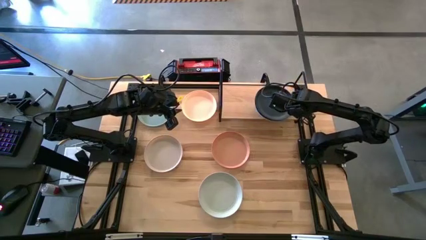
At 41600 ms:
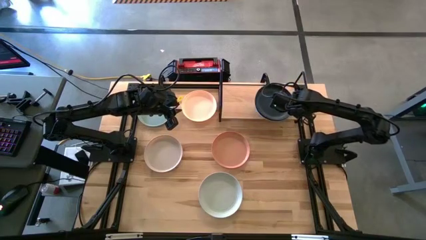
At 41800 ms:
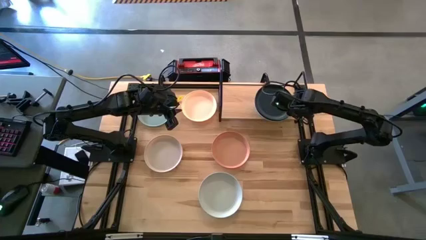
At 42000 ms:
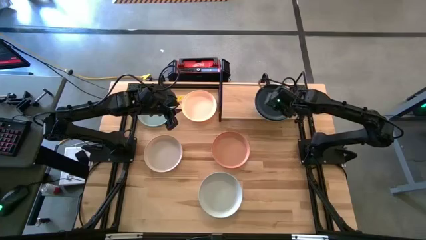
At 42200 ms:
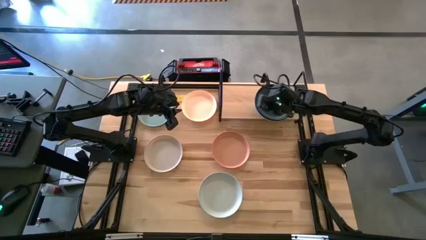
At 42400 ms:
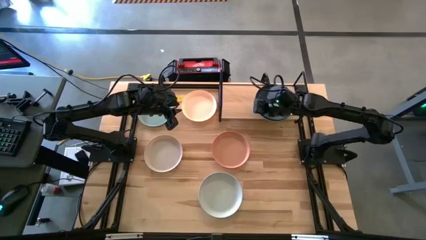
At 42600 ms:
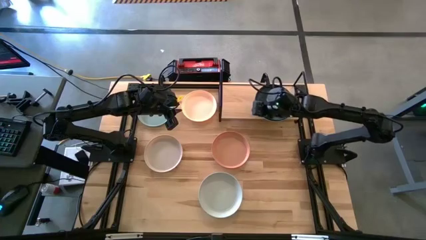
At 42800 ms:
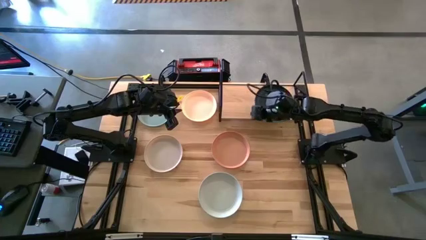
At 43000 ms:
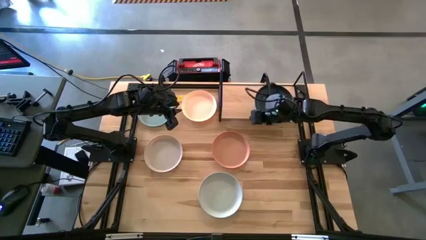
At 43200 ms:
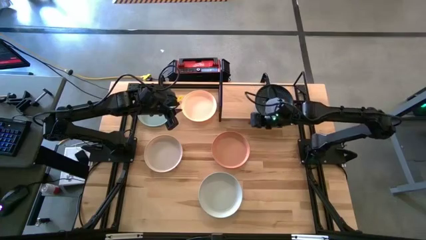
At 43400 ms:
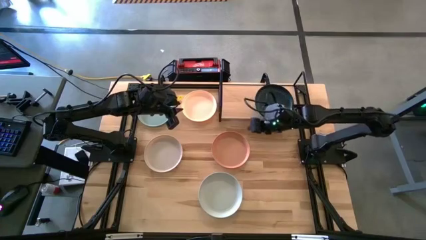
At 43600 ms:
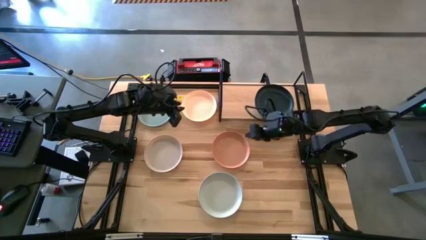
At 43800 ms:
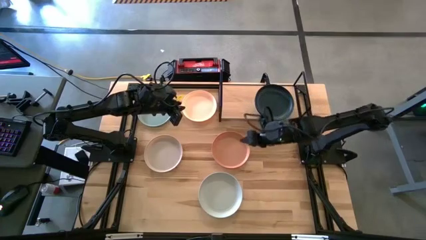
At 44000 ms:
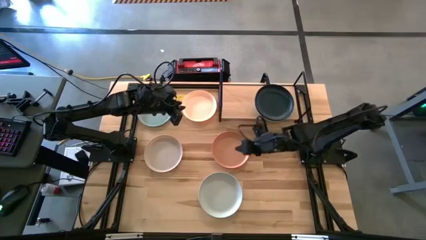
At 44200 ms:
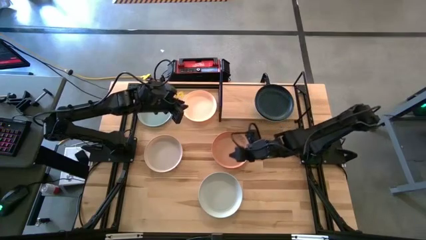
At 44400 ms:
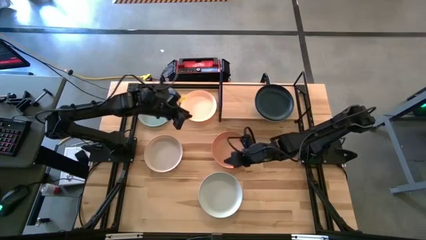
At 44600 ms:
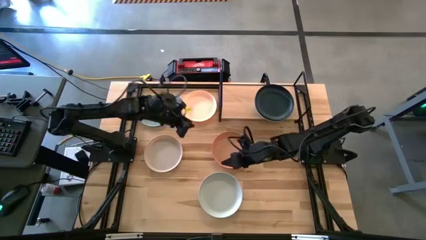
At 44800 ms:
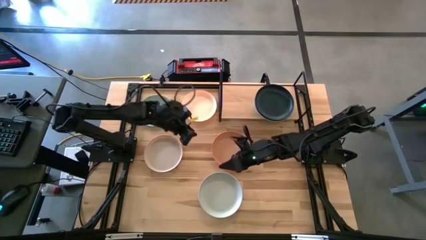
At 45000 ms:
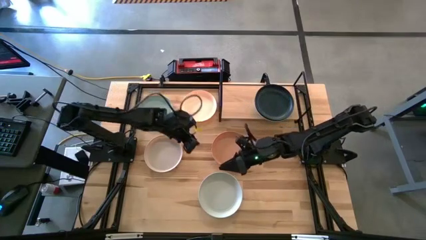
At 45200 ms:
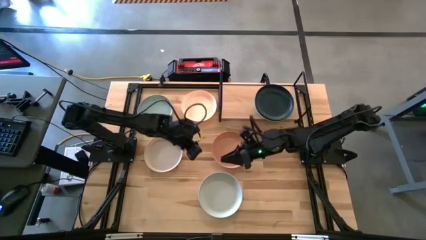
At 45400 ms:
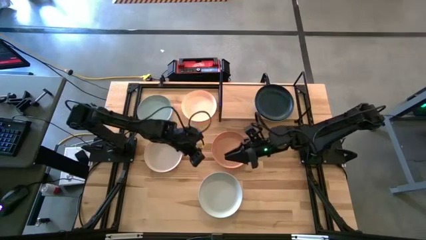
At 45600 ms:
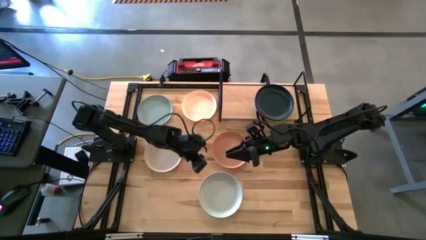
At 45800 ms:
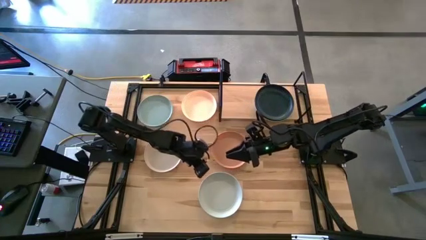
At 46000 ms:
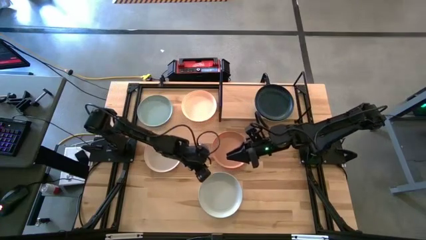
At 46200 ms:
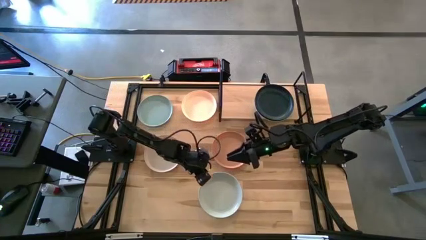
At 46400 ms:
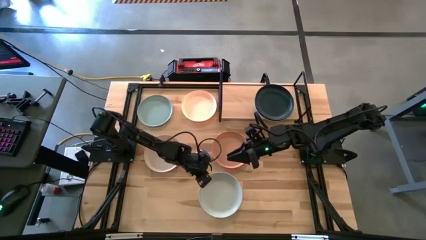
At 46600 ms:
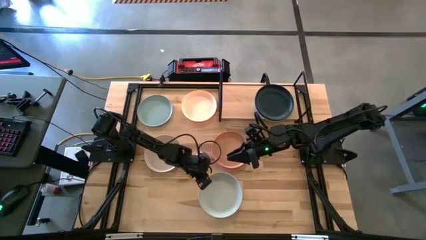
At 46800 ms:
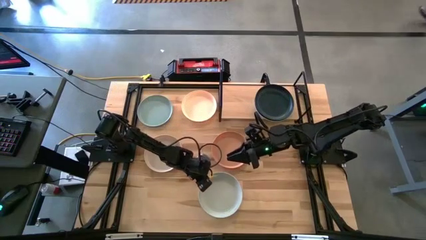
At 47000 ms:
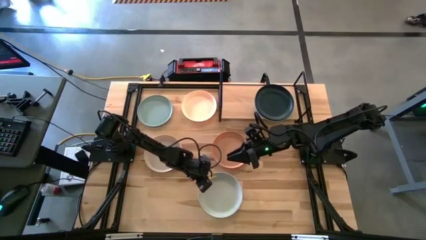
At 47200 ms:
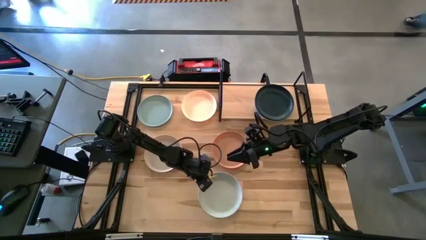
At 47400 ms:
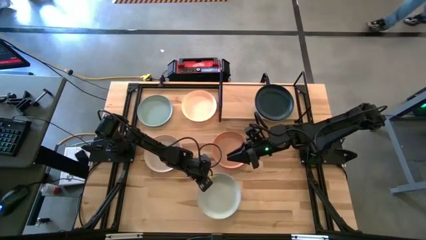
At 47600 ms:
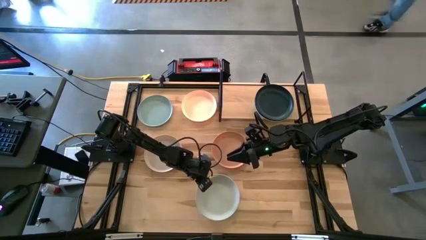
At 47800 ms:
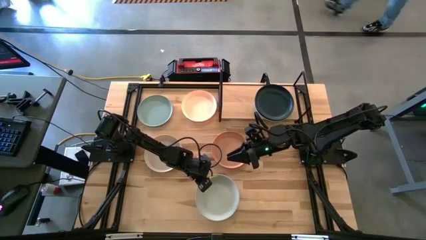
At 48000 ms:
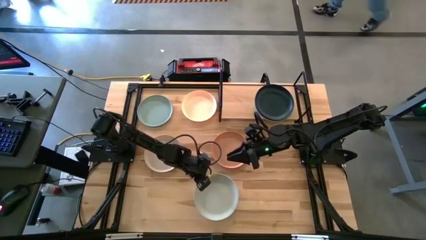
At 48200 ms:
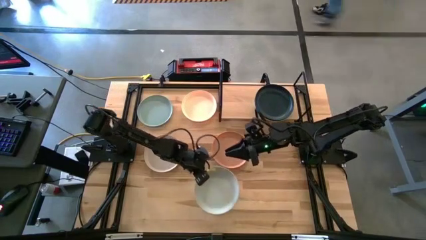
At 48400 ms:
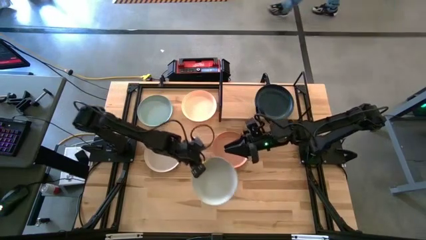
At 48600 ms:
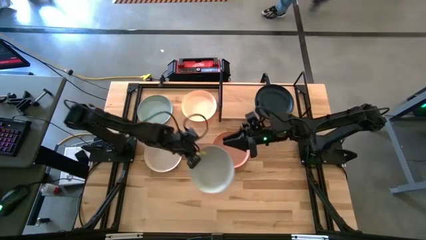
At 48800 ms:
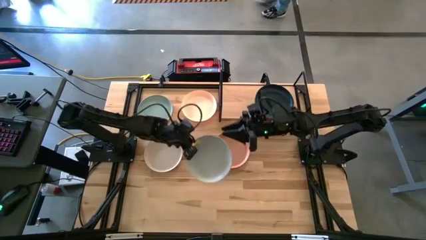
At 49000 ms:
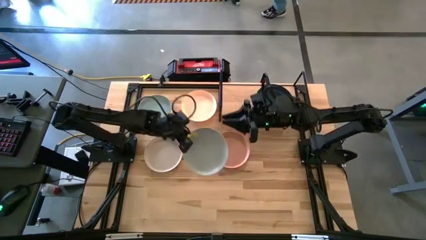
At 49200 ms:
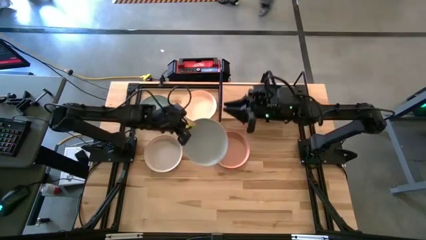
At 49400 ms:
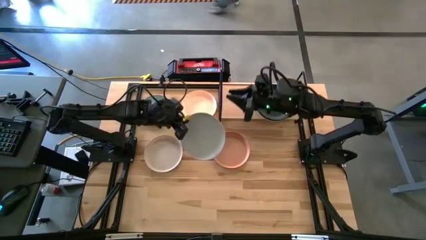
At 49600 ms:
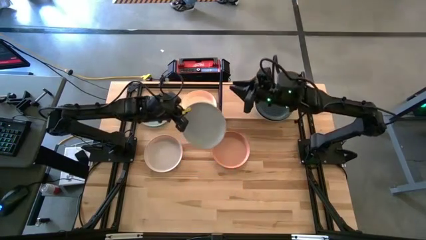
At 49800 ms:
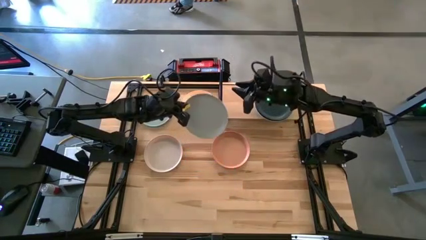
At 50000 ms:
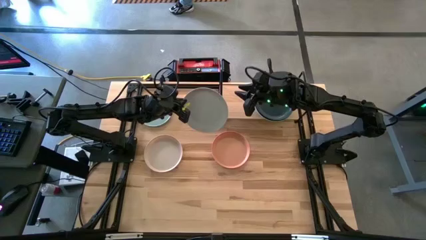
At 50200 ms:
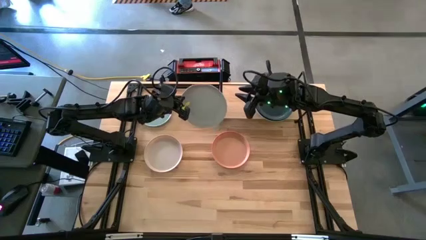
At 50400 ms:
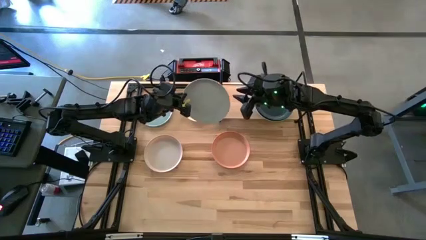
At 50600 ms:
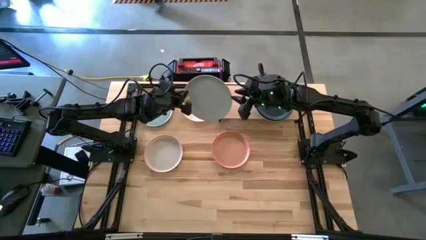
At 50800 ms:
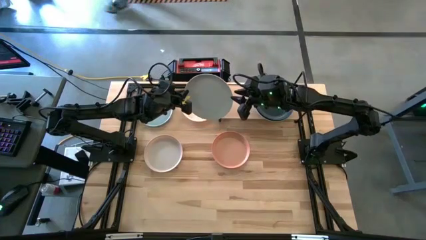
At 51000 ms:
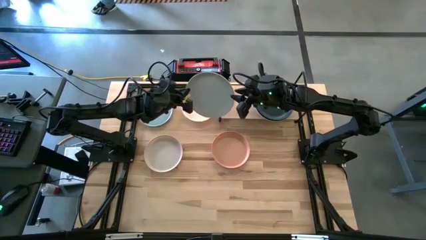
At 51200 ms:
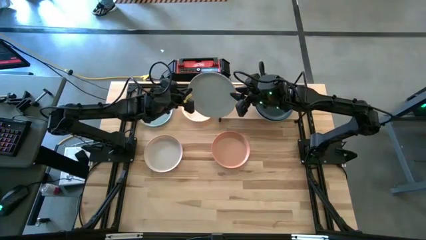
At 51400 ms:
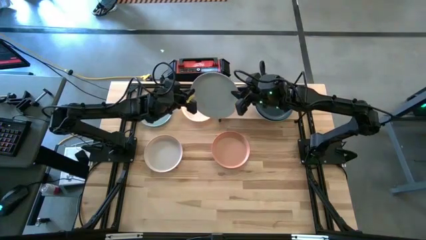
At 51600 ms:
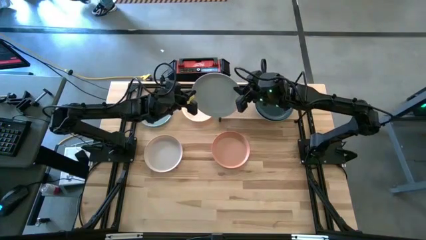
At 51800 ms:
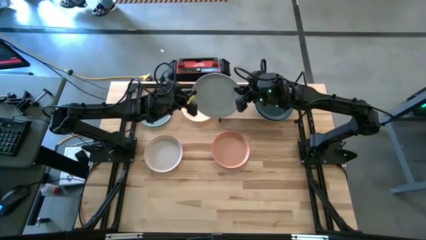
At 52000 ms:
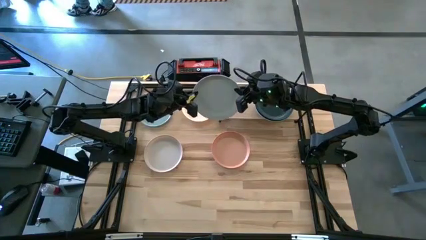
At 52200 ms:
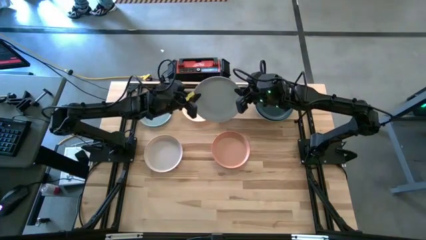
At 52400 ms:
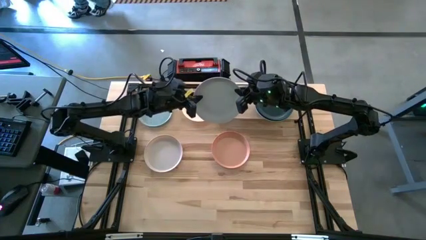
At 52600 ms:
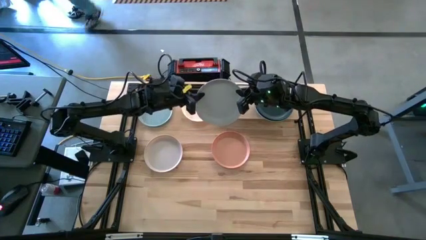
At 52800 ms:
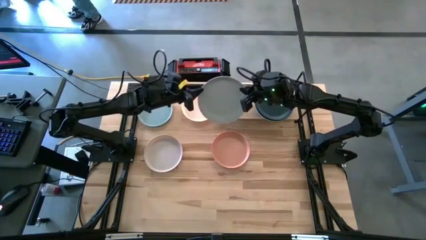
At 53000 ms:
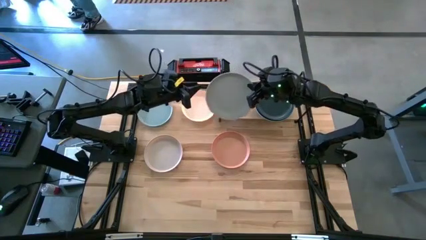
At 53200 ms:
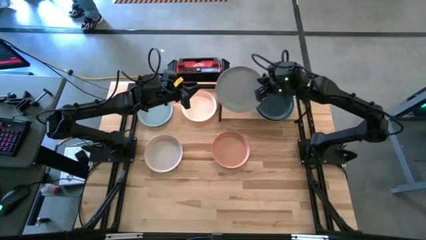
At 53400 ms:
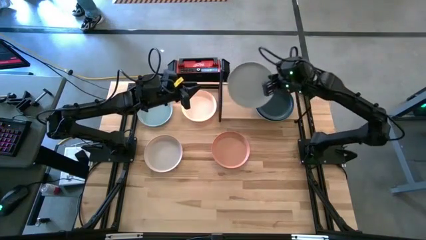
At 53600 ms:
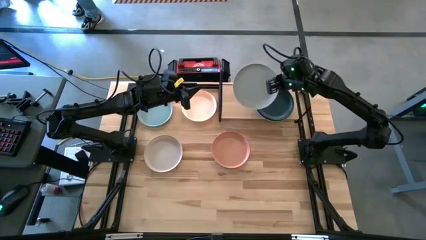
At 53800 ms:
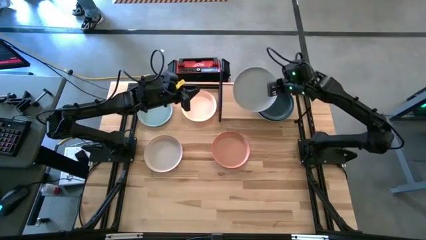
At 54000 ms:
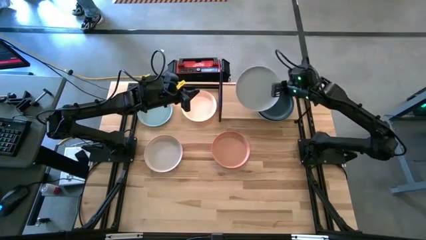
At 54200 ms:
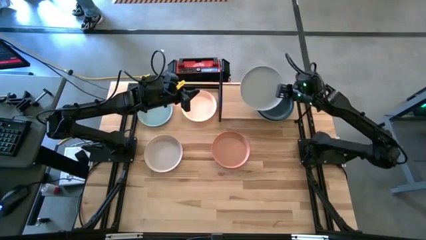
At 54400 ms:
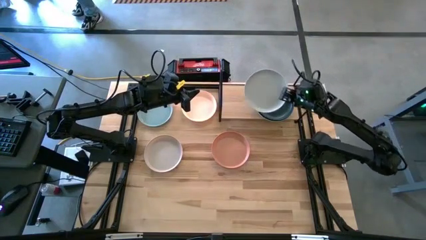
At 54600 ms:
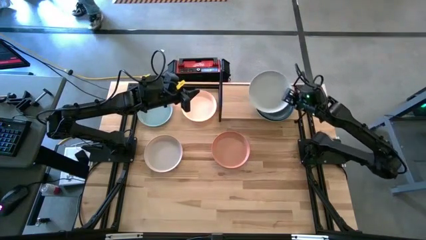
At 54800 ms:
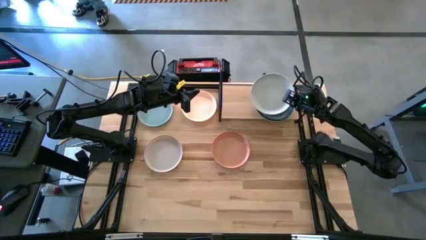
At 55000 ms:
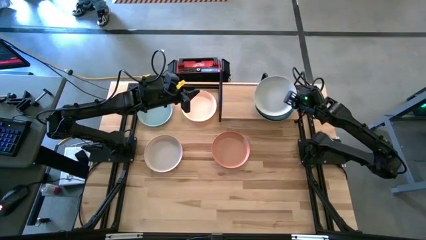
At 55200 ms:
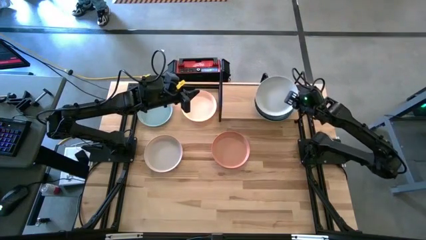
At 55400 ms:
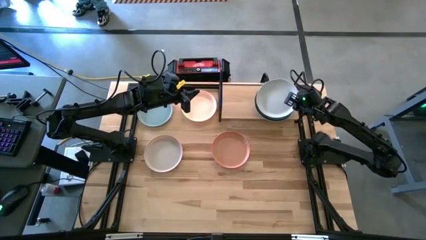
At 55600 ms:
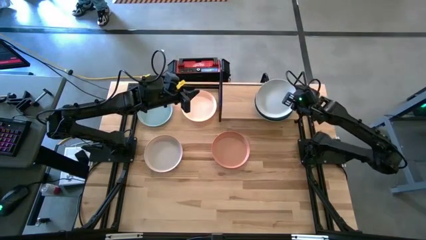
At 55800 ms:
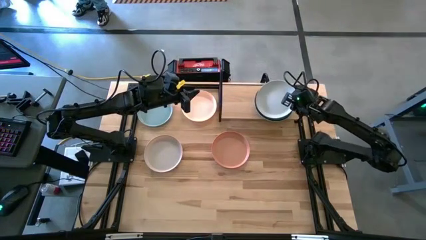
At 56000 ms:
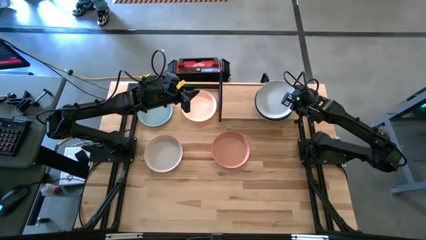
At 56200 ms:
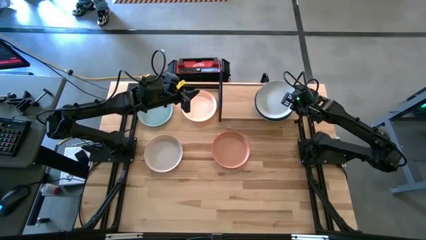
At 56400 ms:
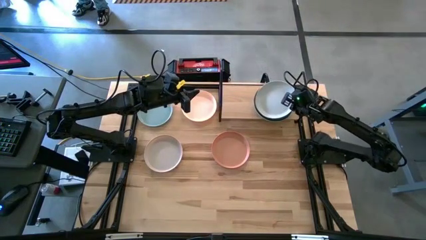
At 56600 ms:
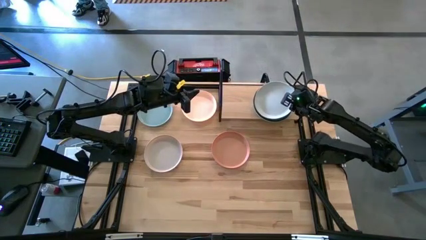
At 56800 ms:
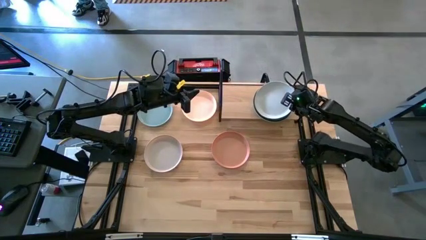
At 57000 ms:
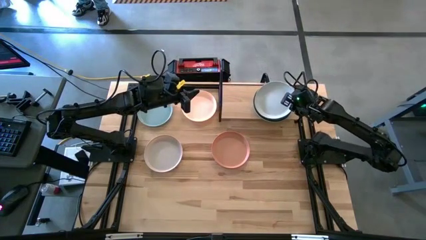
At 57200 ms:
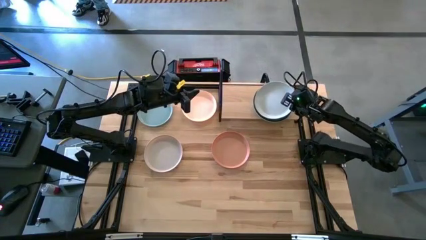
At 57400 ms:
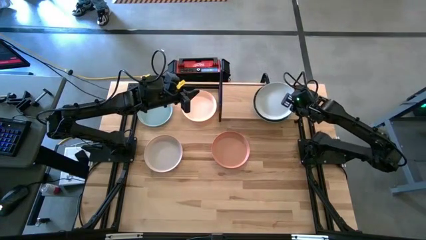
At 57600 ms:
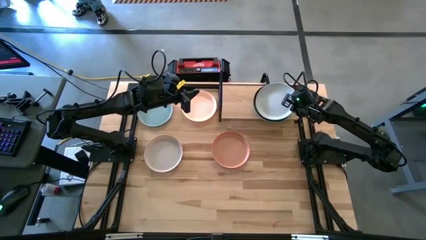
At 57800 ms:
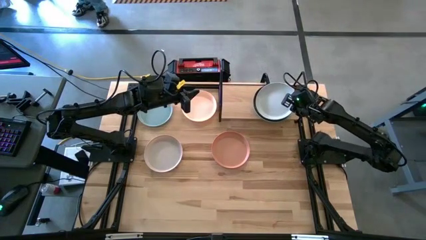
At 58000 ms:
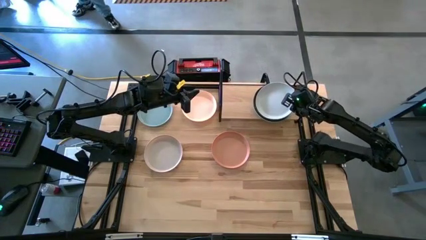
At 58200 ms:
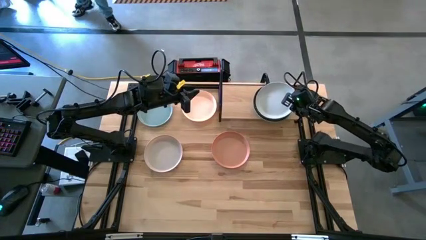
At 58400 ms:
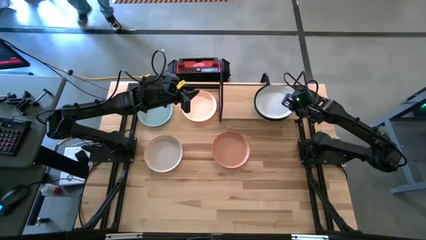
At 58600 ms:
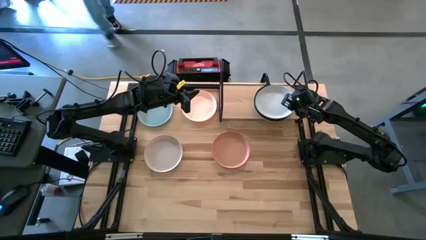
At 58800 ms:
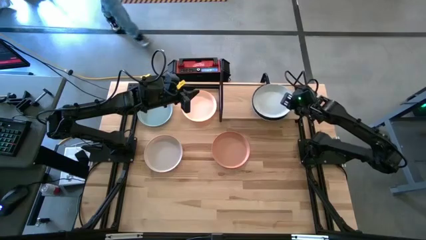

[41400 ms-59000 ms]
Task: Place and stack plates onto a shelf
Stack the gray plate on top of the black plate
